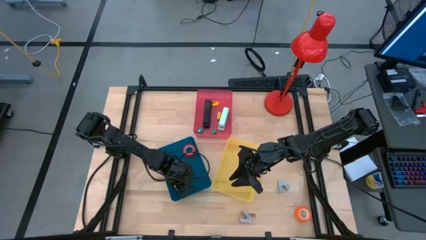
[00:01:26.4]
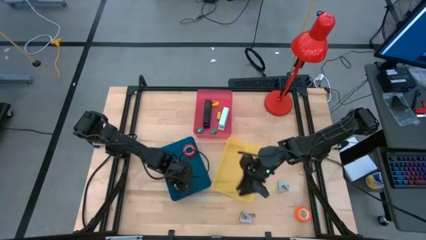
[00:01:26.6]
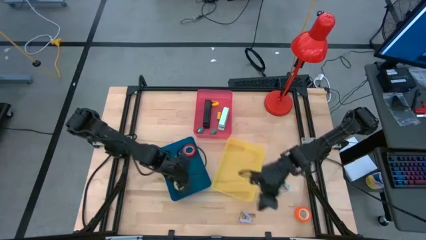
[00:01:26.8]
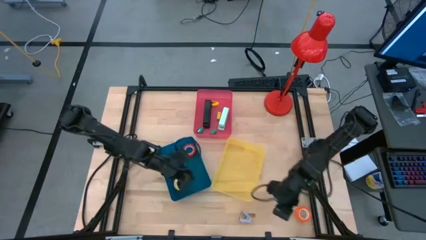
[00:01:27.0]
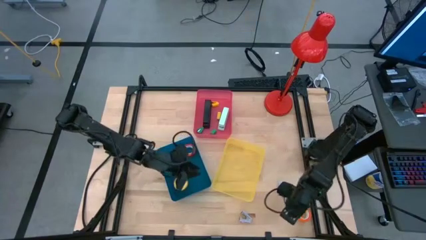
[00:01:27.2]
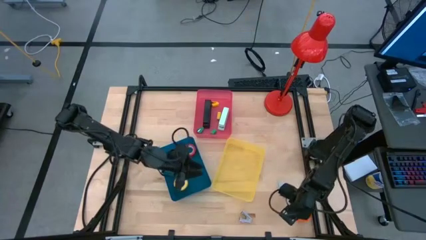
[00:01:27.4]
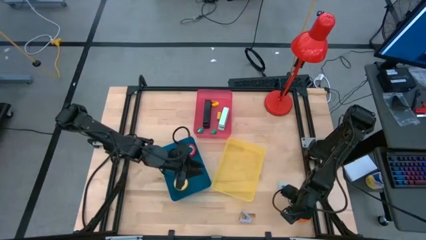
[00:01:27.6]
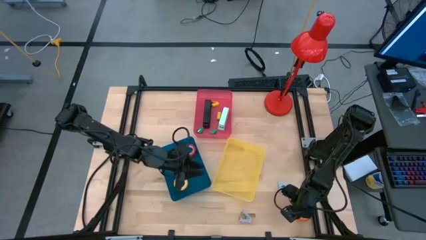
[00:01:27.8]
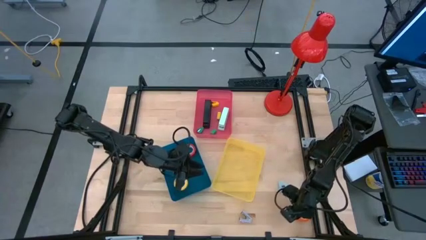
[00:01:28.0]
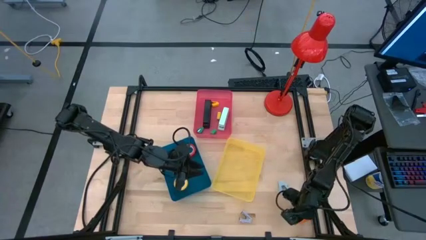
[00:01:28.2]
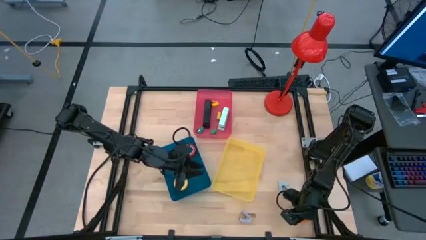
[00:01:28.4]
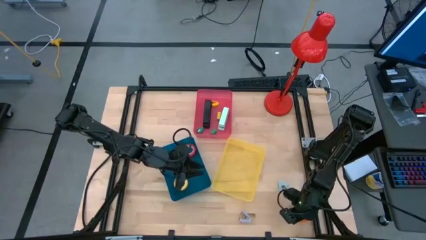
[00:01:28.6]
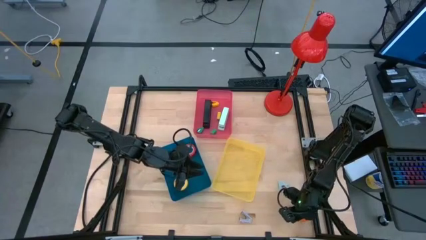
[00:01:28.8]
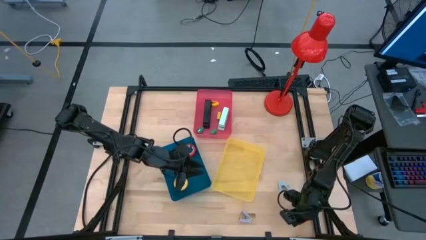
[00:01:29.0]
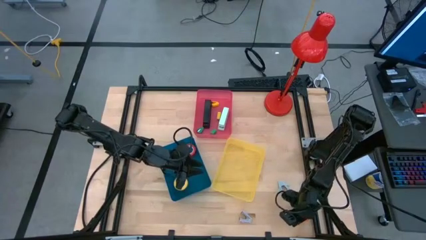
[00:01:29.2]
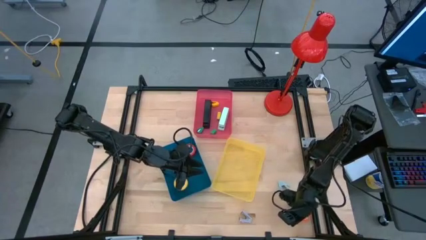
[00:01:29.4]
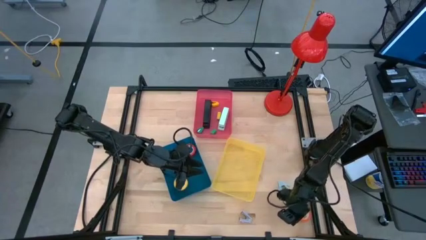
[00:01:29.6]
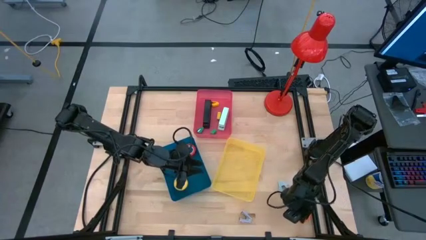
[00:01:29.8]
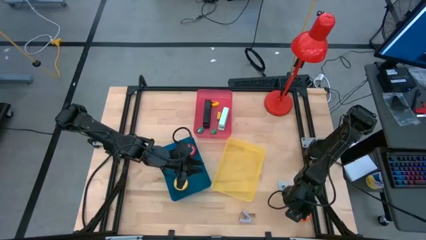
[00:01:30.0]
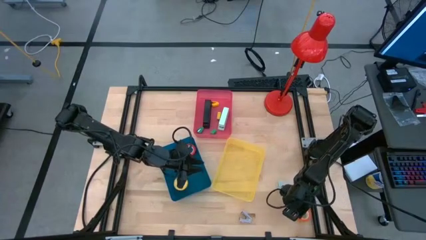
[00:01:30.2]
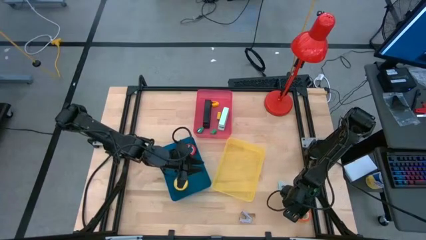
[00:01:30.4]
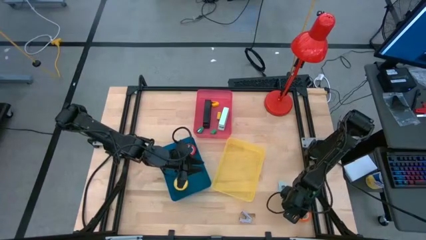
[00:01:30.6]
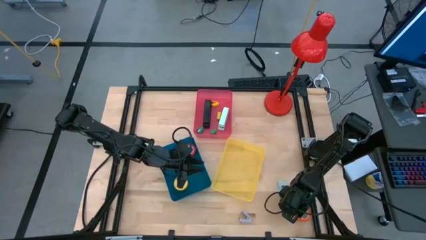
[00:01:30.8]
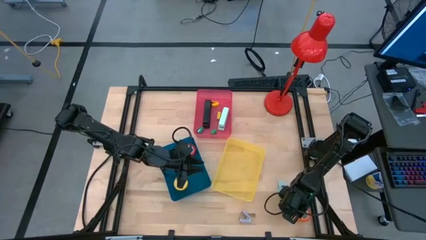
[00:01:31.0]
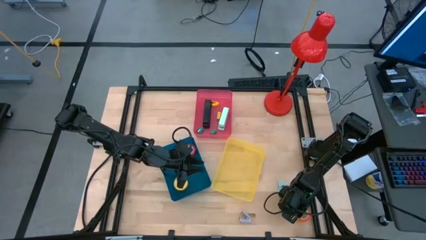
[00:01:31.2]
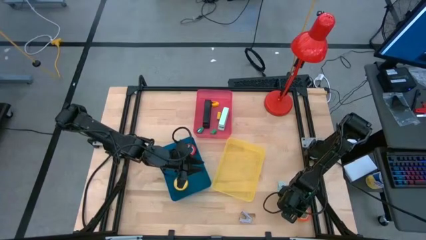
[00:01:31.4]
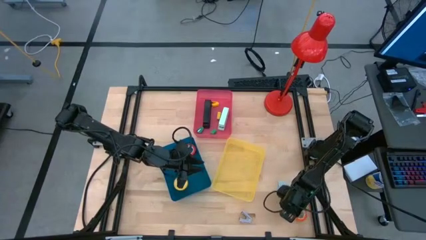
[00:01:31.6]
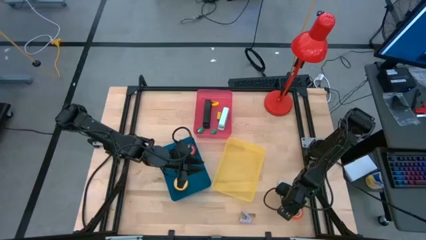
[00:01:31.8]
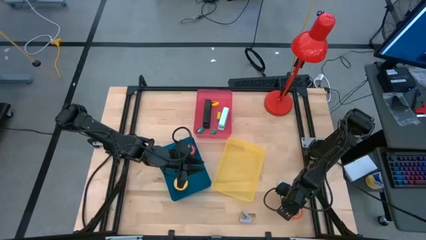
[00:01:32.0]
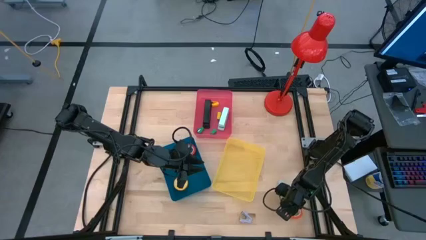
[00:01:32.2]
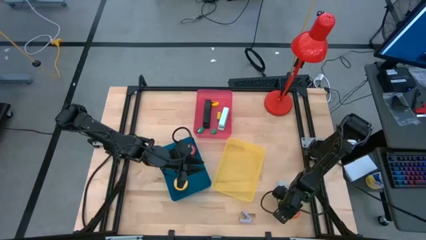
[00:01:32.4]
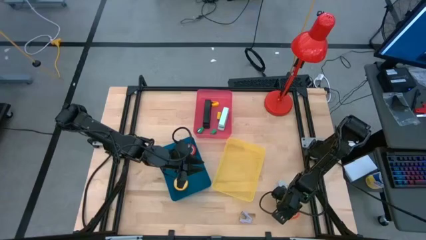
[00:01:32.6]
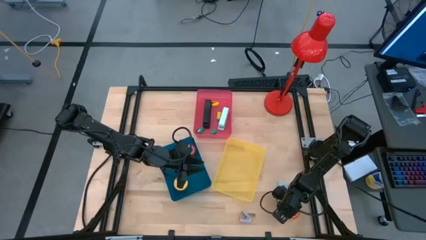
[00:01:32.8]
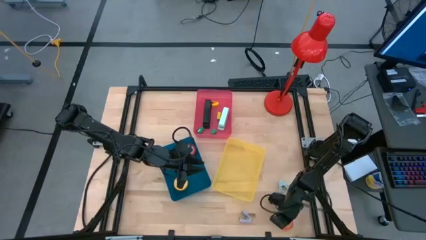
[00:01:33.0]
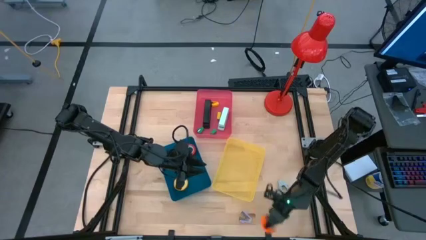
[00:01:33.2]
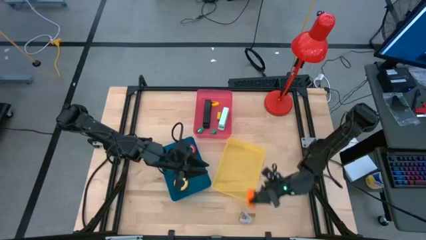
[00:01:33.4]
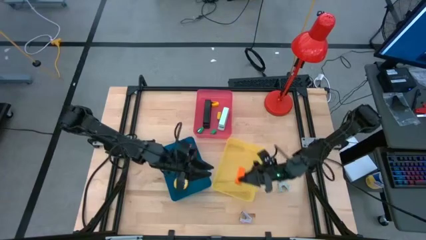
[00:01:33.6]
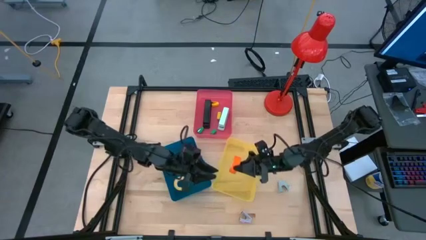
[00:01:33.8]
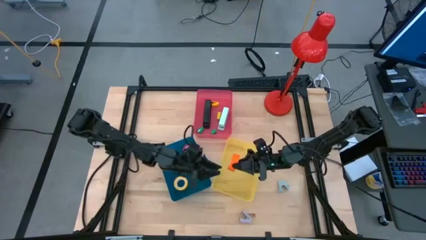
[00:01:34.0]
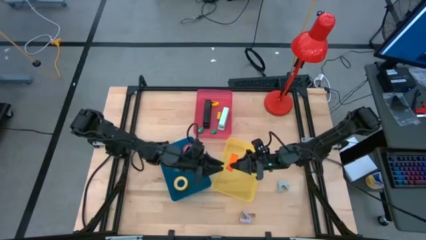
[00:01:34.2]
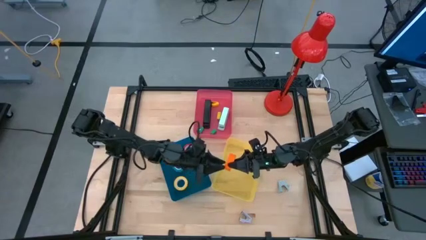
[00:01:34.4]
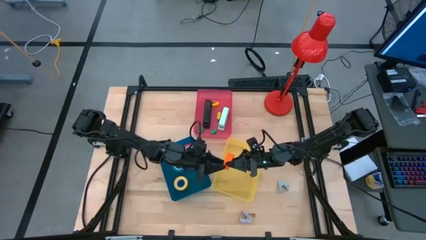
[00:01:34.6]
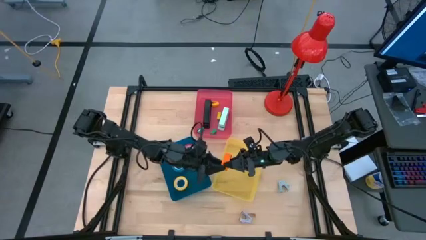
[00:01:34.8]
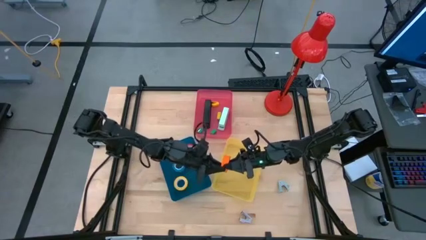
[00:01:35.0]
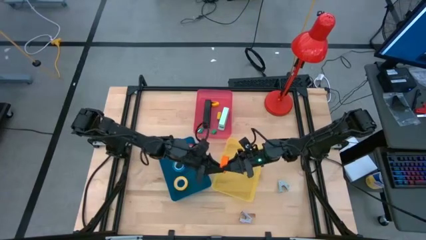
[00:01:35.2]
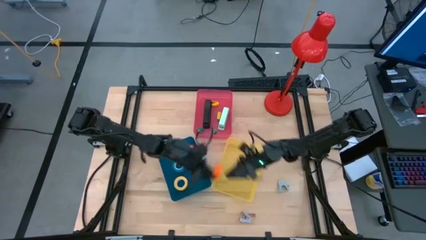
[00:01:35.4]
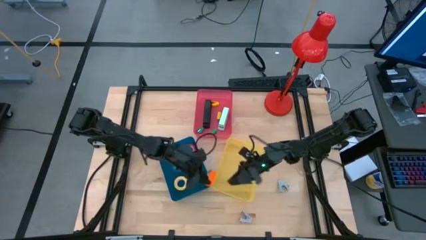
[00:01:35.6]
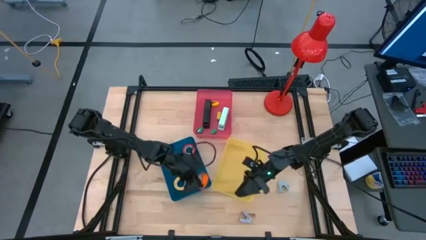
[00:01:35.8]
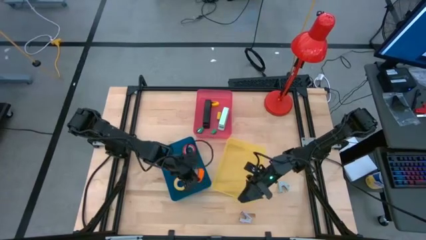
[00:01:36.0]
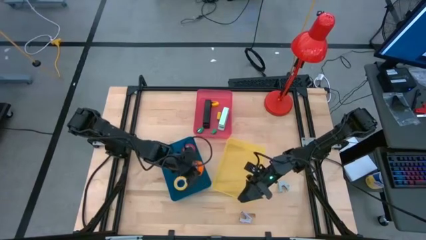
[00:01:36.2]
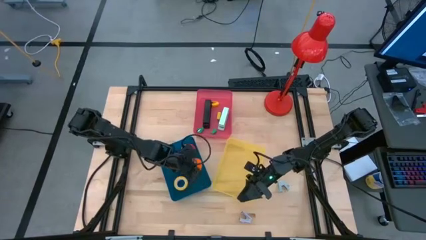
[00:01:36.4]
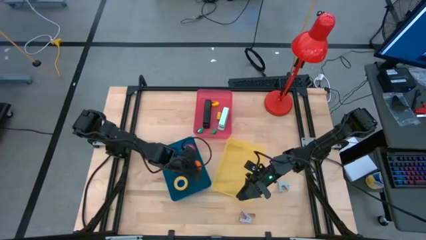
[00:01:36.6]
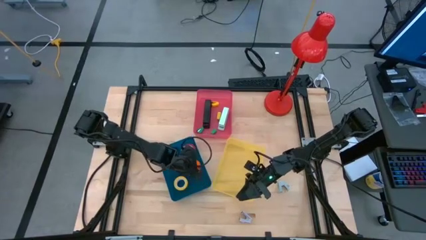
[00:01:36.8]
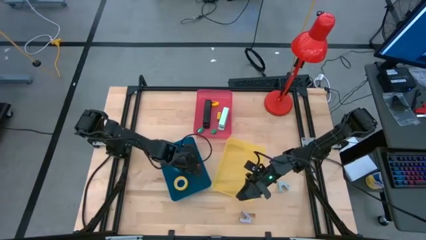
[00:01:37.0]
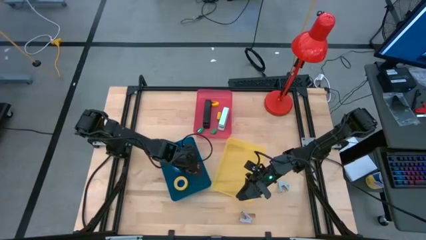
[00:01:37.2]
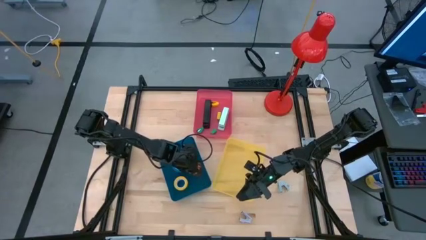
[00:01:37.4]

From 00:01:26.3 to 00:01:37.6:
Task: Pick and place Stapler, Stapler remover, tape
Put the orange tape into the blue bin

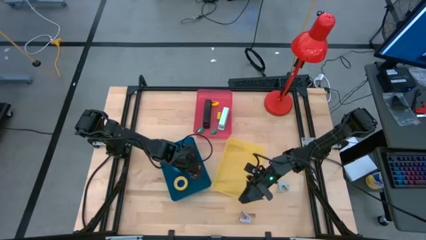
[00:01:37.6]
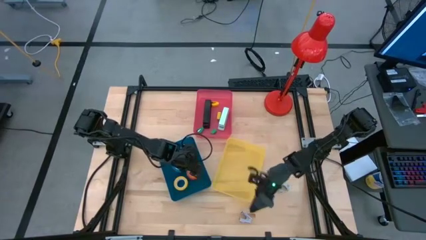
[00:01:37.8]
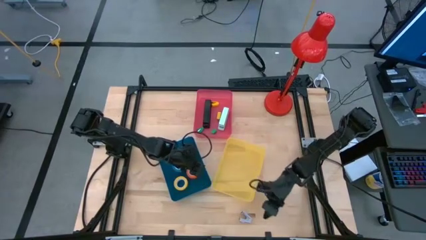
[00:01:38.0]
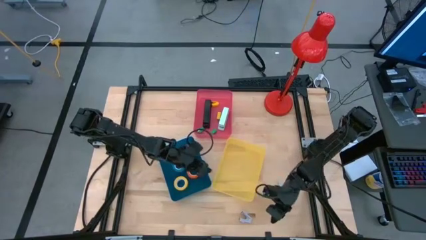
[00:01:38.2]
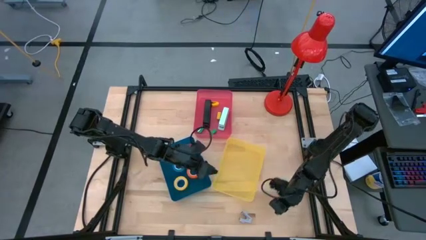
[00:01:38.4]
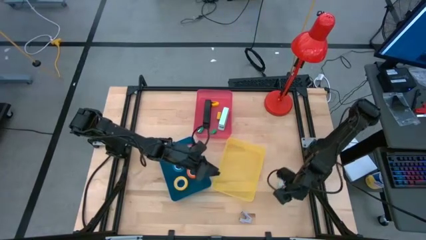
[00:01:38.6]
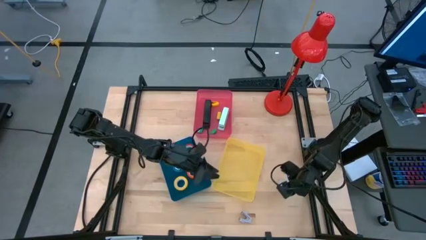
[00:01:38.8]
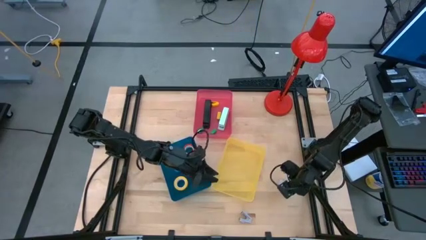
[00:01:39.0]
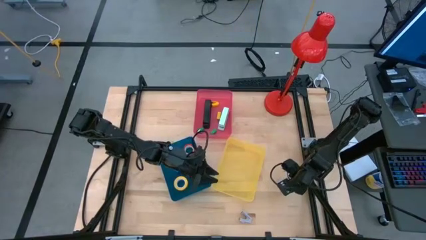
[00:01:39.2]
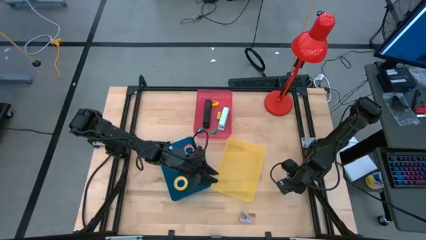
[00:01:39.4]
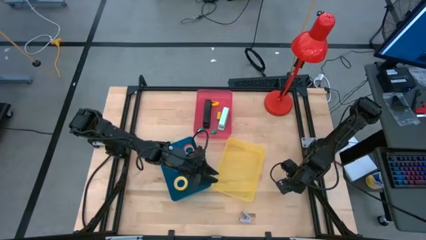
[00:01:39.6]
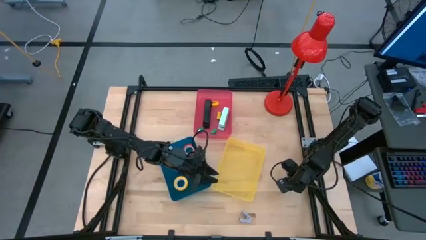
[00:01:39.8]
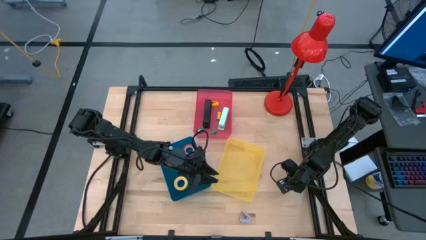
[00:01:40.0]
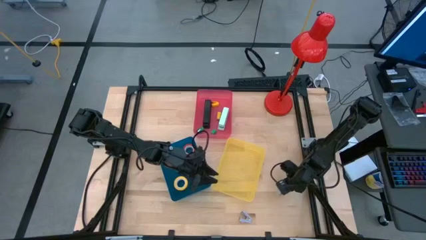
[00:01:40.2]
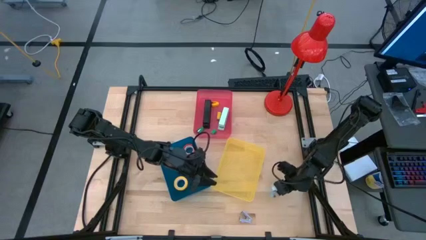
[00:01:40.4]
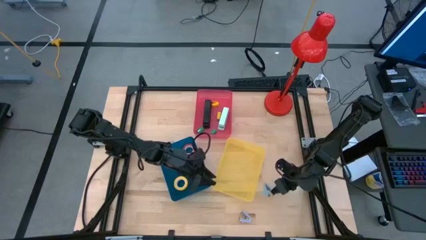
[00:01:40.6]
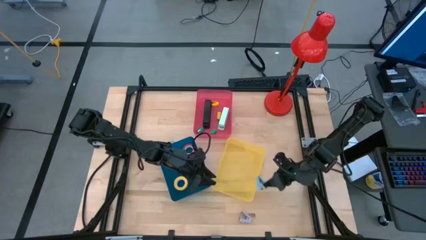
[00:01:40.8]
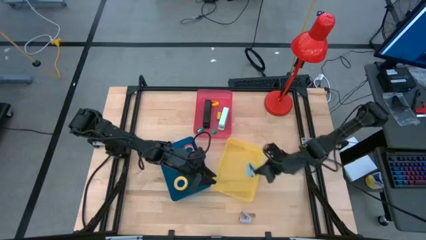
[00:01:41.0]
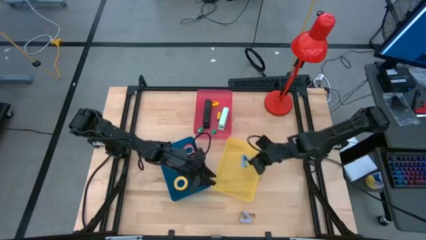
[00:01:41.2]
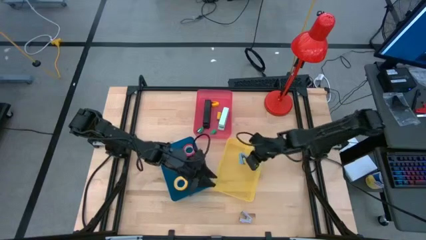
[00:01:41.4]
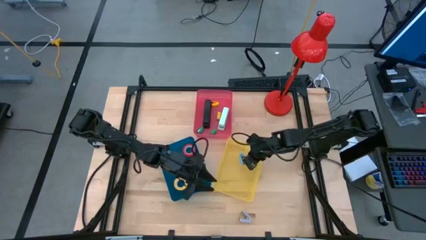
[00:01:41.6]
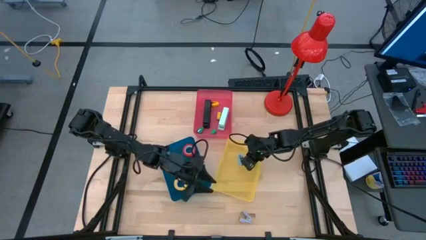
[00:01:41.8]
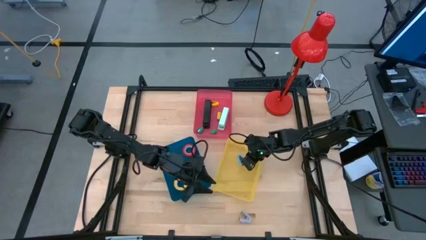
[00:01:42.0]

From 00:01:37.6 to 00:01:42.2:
Put the blue staple remover into the yellow bin
